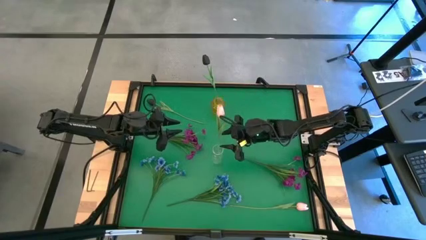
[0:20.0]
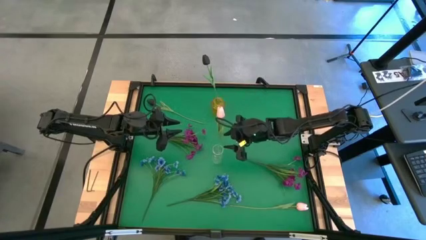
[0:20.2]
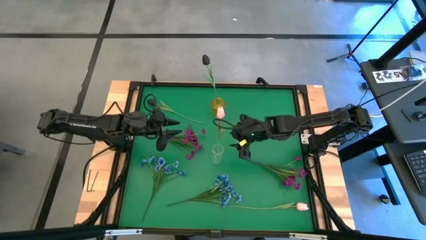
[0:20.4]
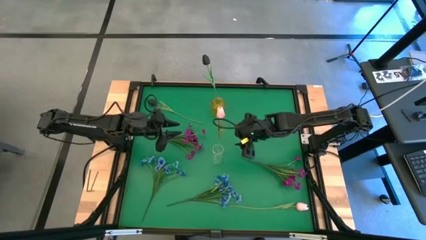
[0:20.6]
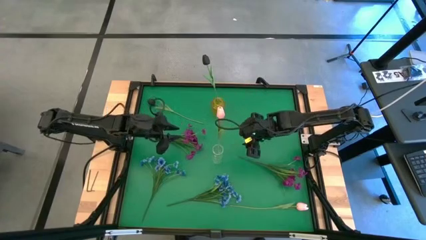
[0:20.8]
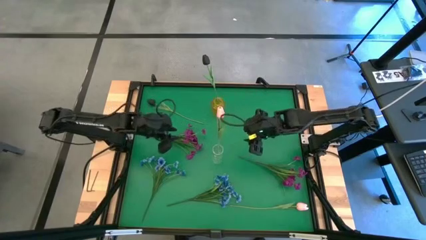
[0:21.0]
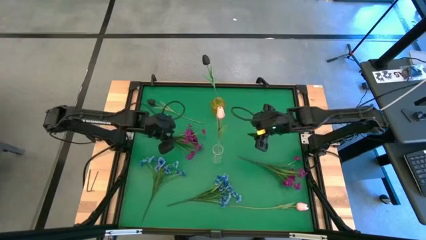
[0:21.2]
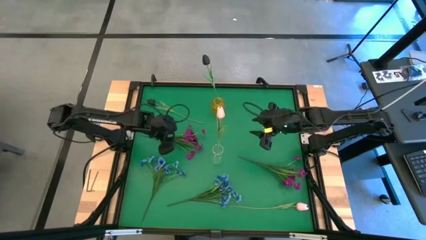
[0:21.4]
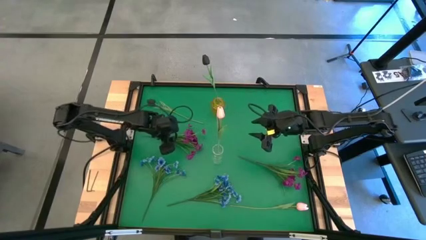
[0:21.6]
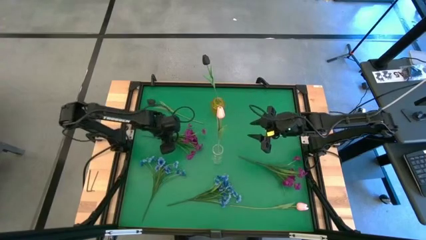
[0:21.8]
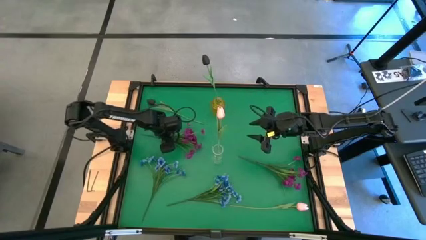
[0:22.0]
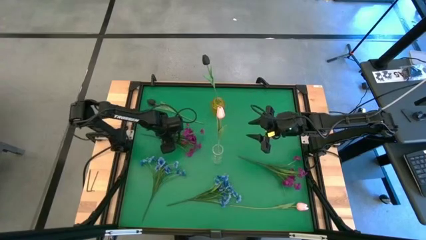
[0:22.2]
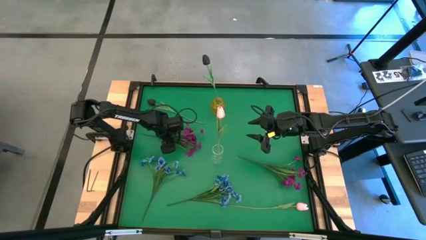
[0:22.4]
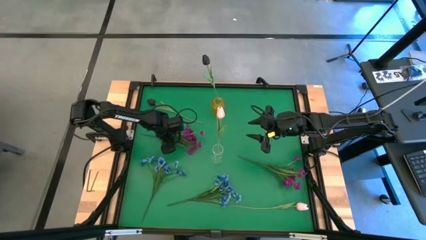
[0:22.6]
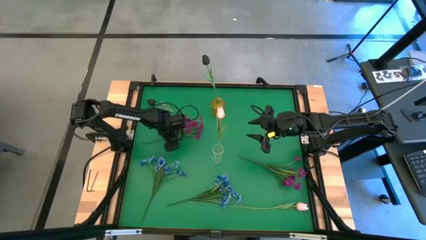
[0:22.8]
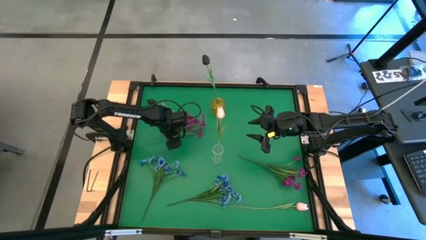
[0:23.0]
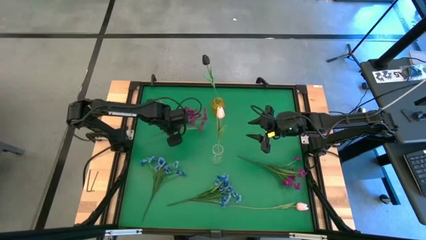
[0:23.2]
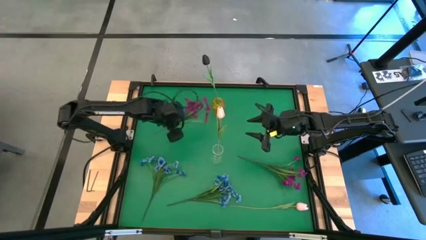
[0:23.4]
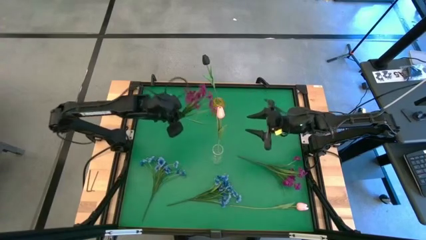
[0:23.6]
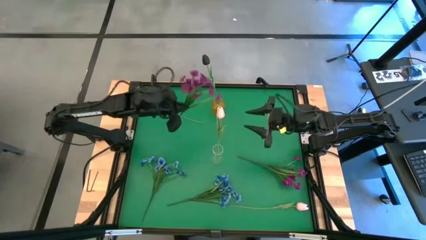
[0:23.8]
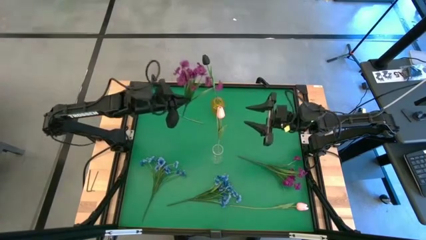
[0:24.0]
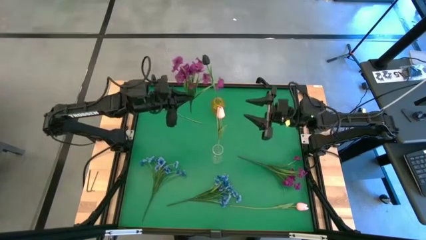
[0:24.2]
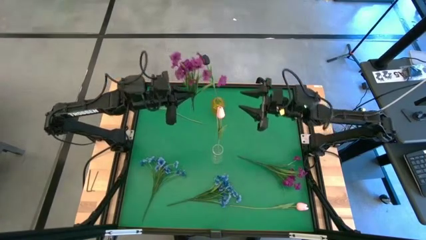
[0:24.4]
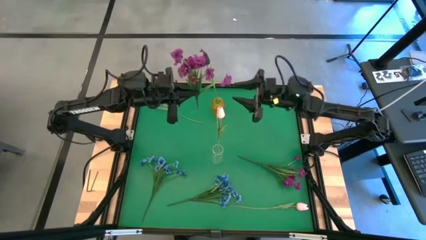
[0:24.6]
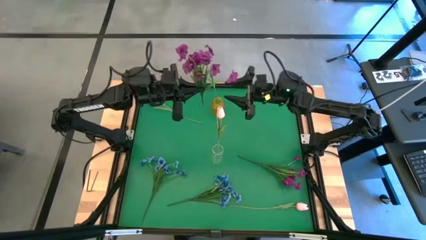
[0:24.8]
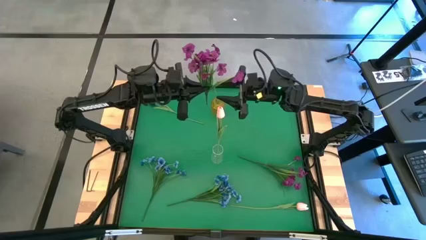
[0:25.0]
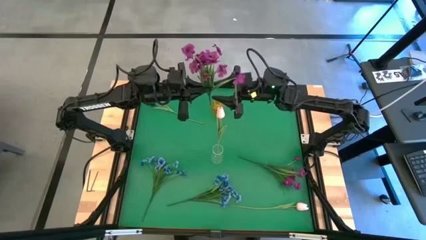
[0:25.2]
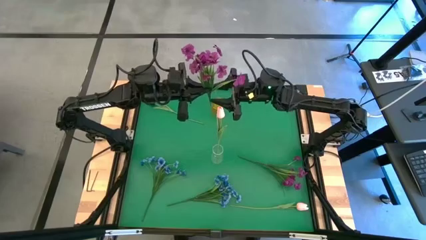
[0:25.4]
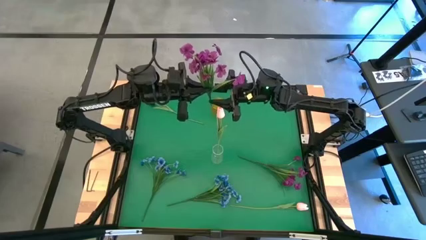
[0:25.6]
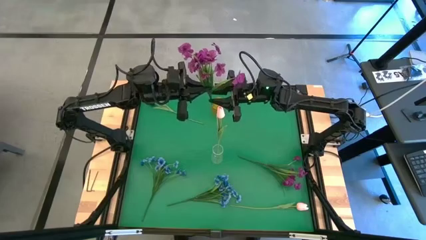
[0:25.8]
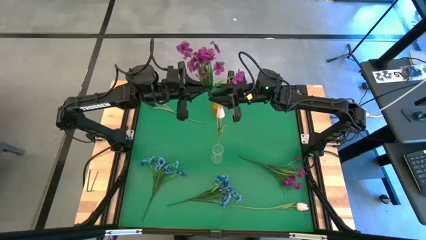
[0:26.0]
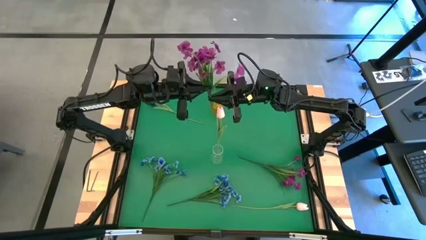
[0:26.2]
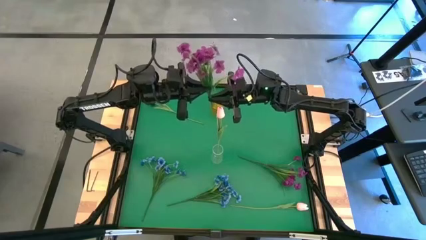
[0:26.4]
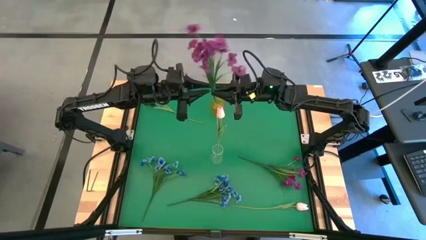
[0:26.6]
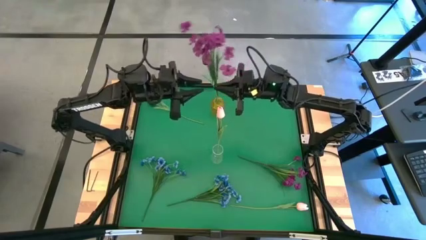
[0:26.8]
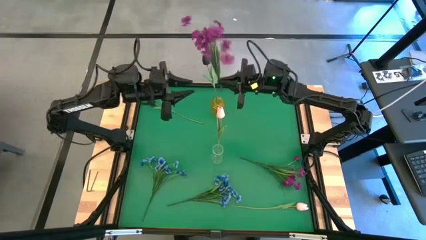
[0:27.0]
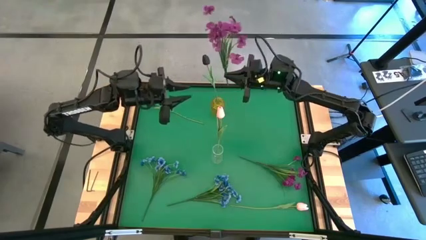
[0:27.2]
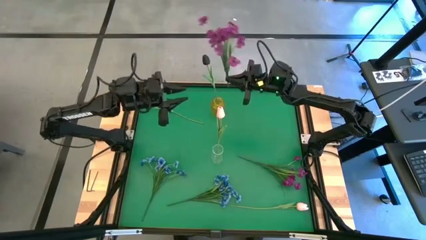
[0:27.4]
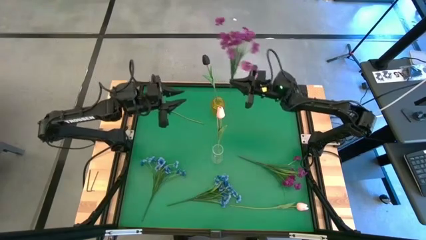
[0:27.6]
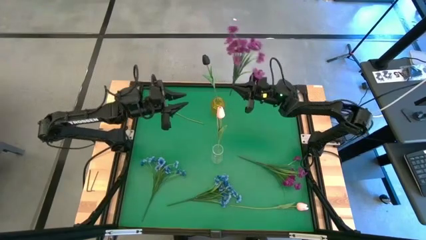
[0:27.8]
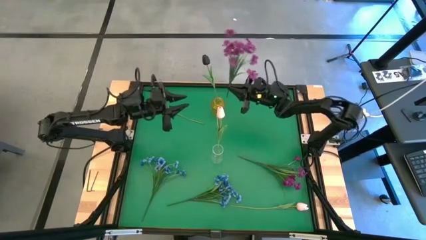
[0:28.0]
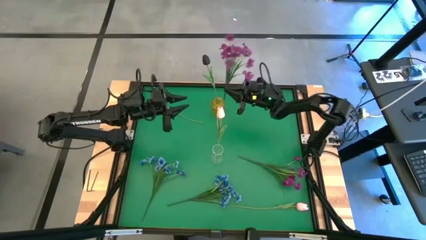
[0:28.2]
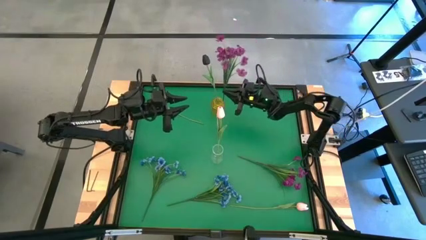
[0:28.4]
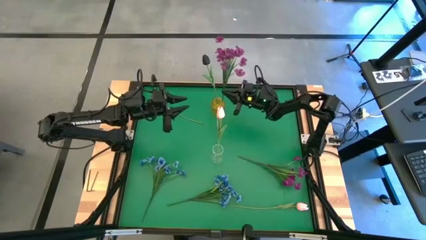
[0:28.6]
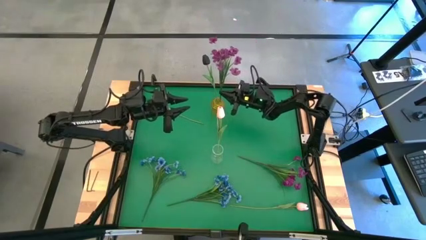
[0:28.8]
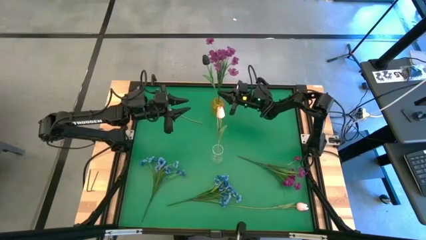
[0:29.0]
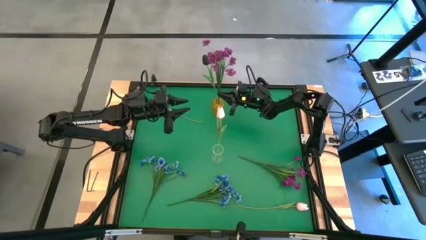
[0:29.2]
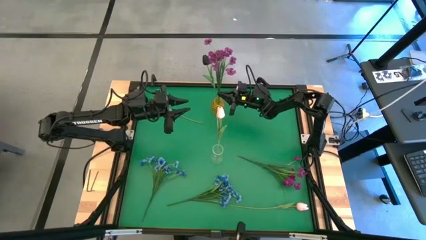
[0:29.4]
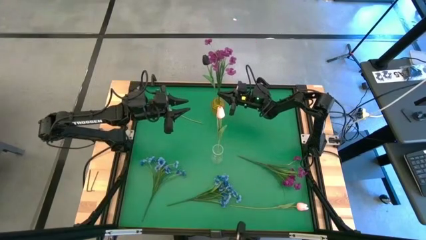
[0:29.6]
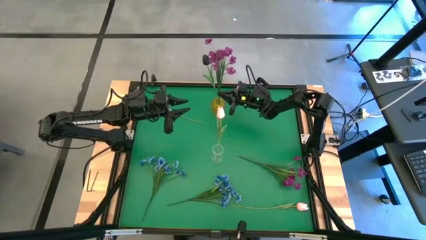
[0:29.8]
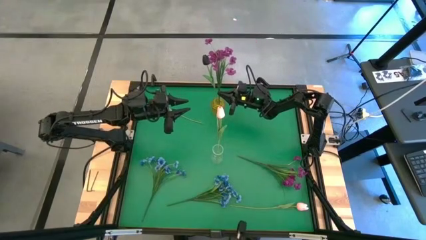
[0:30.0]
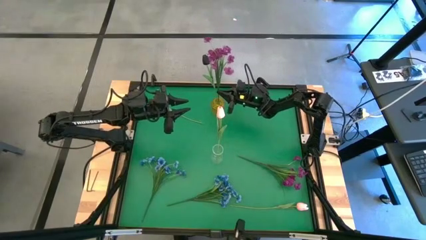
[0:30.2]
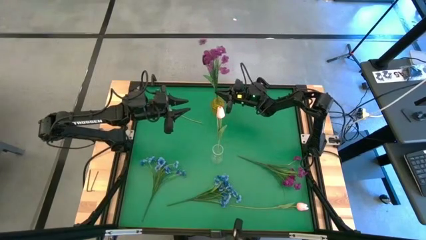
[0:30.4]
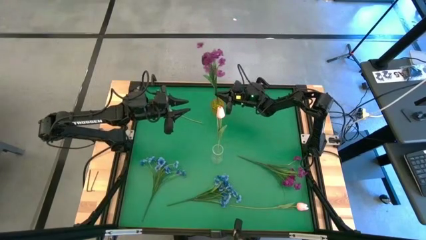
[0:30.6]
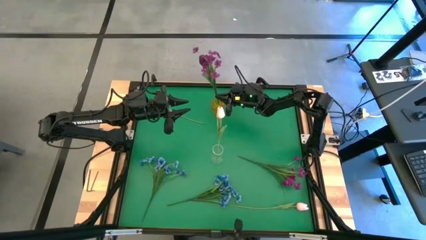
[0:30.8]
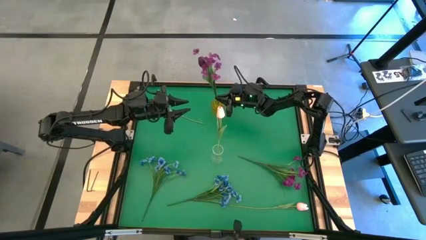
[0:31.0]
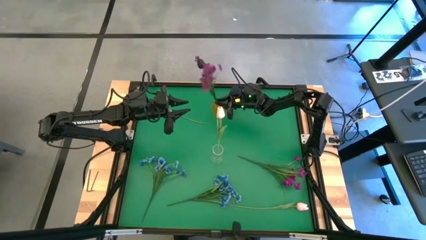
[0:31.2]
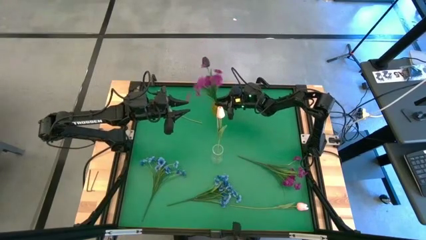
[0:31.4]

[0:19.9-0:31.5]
Task: Sort flowers into vase by color
Put the left purple flowers into the yellow vase

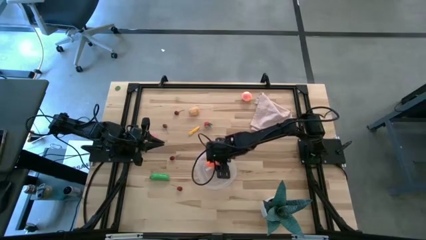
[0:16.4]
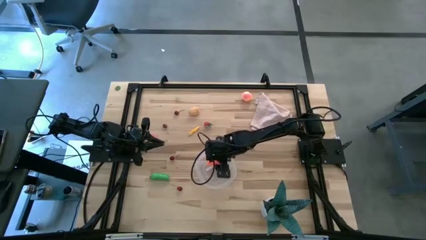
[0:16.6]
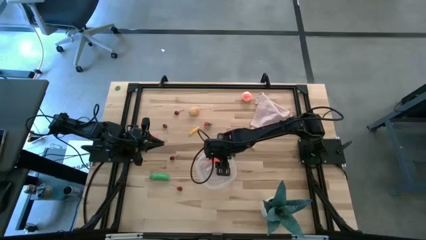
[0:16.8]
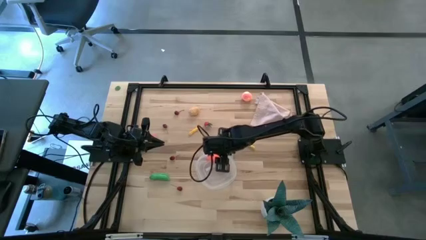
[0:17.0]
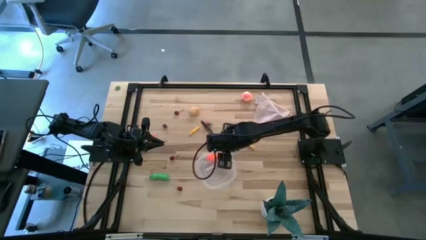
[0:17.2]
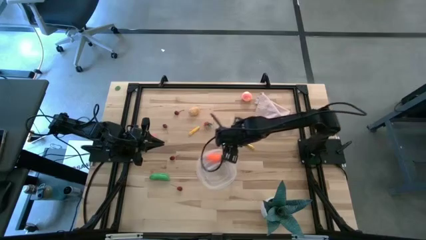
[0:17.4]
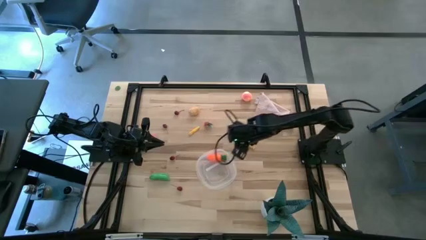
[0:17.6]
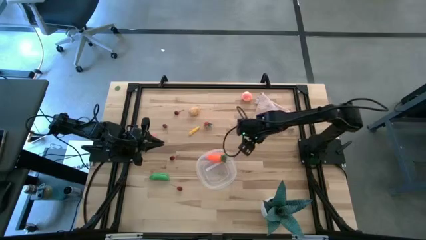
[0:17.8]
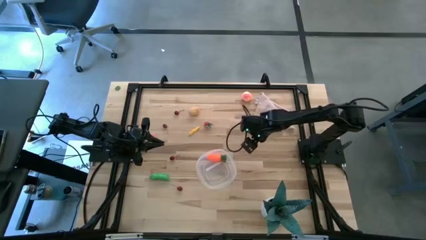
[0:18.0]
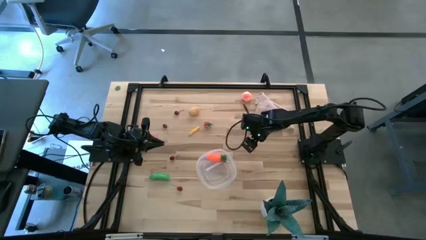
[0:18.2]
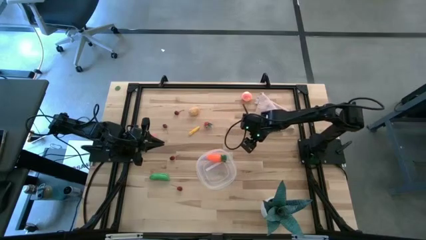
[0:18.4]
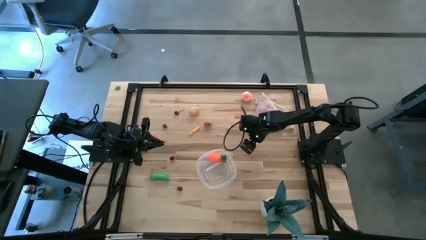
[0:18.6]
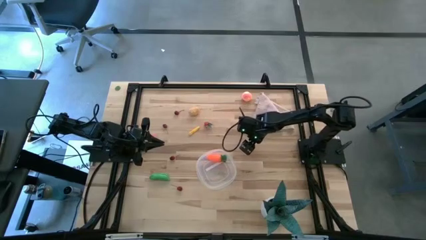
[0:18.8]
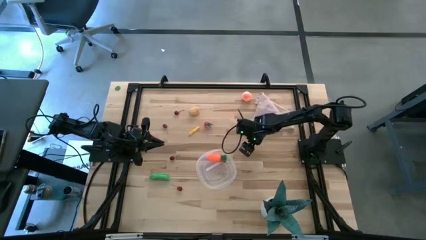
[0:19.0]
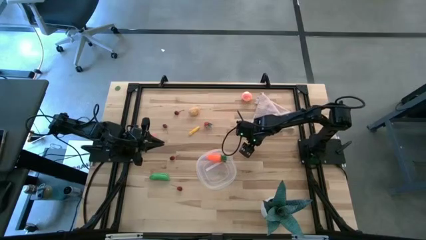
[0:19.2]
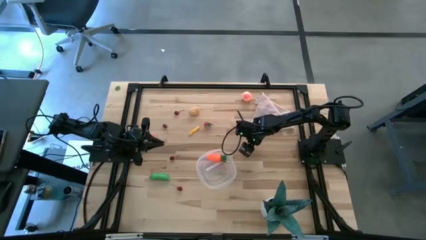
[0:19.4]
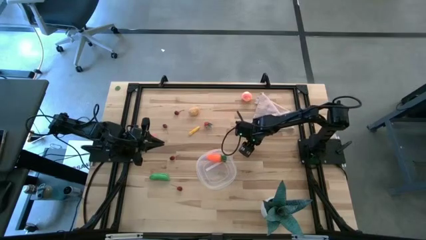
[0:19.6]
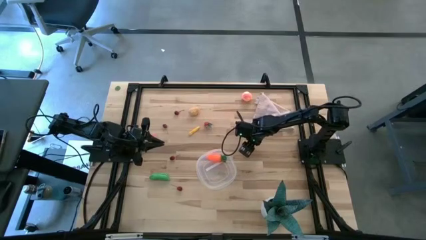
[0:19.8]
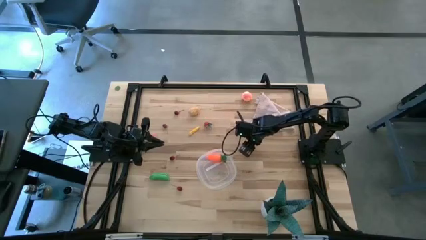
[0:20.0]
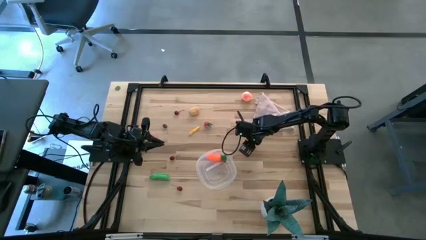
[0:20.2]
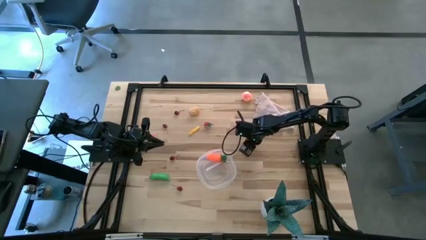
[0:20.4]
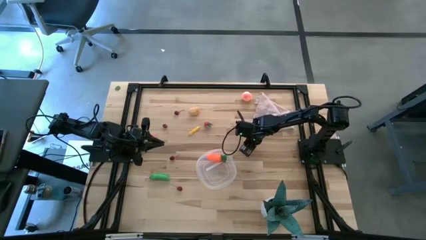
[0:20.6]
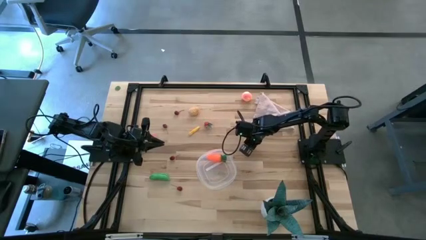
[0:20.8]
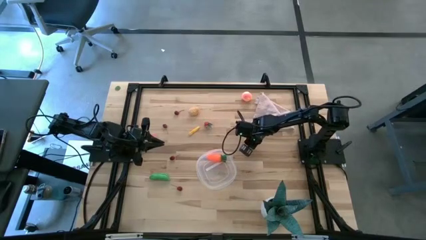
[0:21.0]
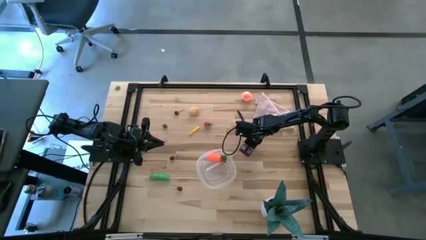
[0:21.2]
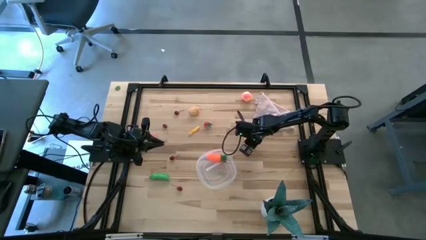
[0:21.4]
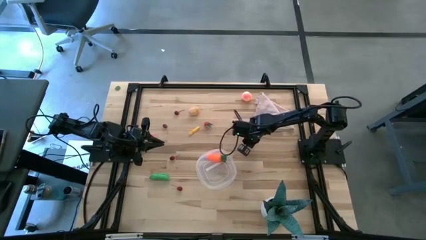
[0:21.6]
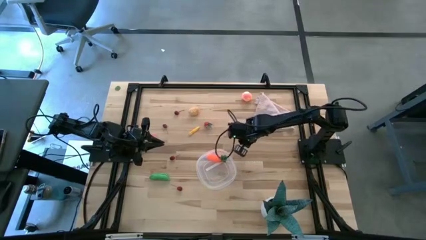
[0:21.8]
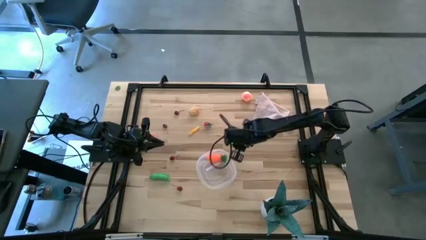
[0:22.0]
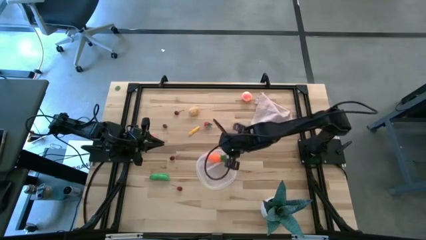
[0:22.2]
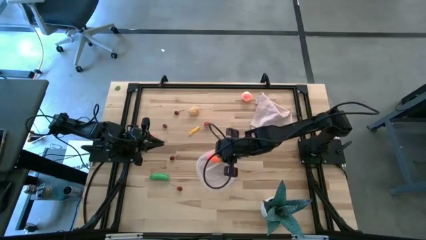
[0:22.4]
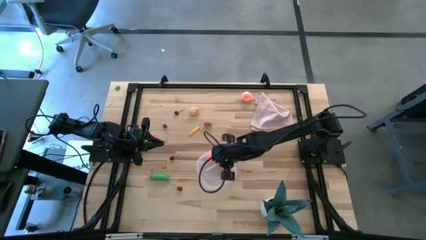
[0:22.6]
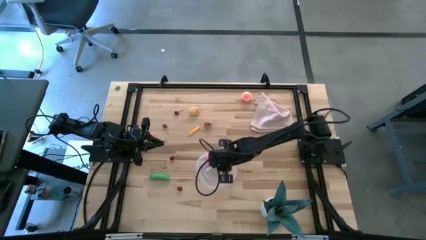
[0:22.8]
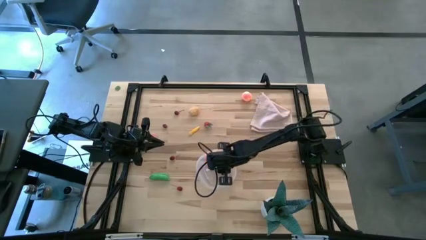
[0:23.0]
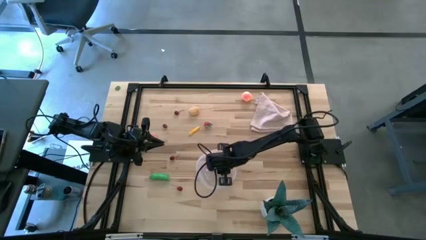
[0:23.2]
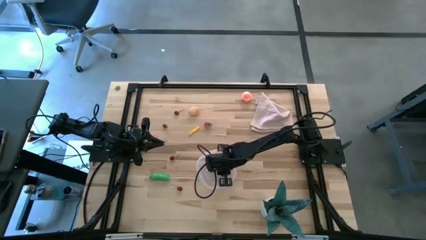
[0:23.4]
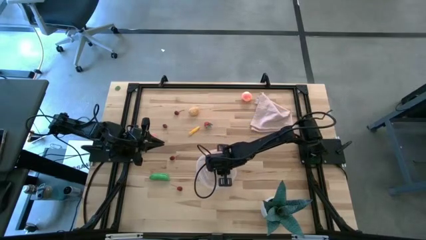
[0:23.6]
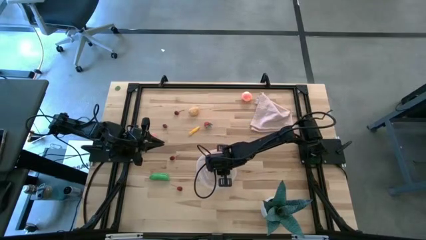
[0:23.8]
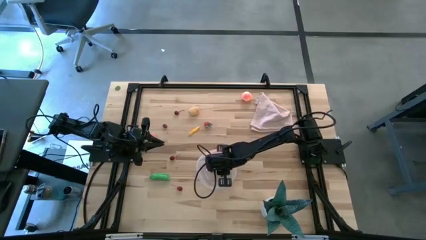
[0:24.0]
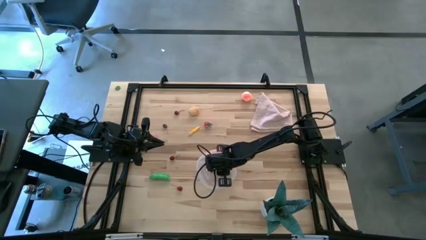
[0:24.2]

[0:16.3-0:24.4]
Task: Pick and placing Produce into tupperware
Put the corn into the transparent bin
